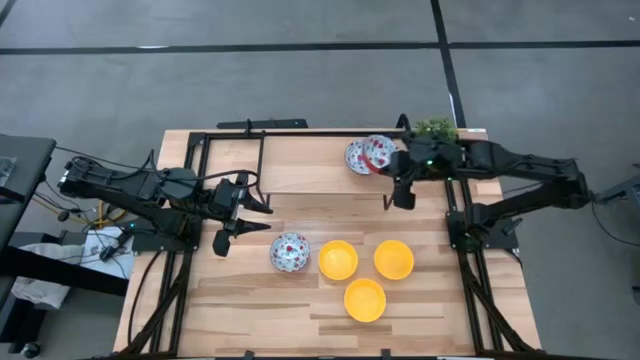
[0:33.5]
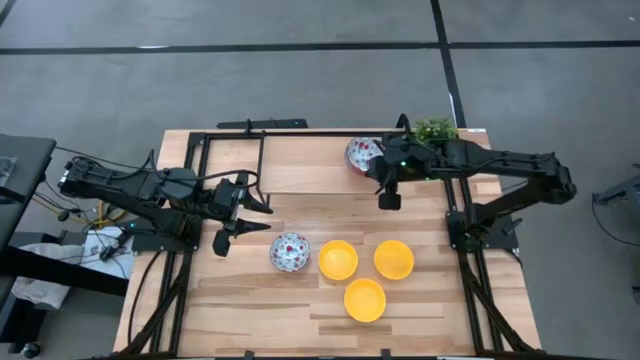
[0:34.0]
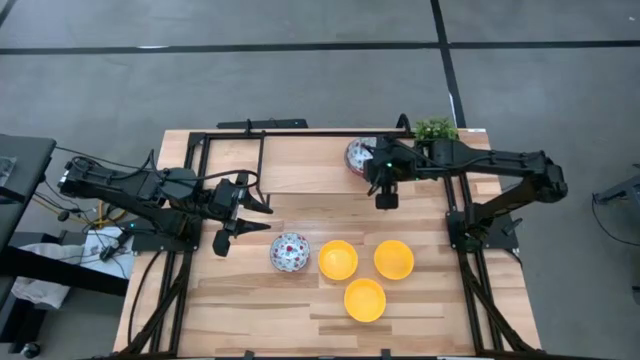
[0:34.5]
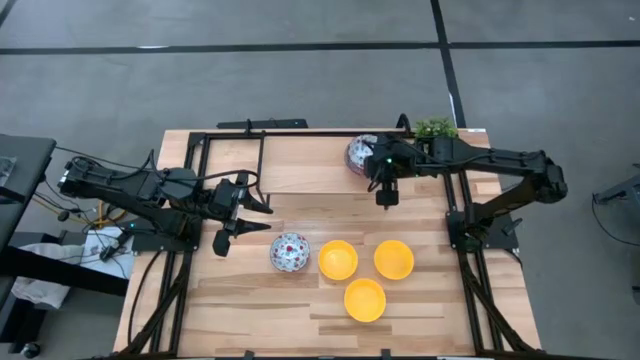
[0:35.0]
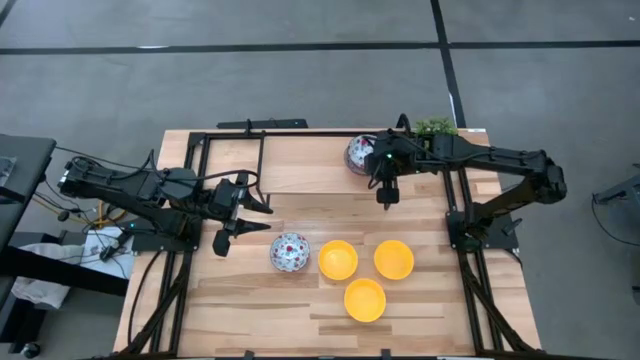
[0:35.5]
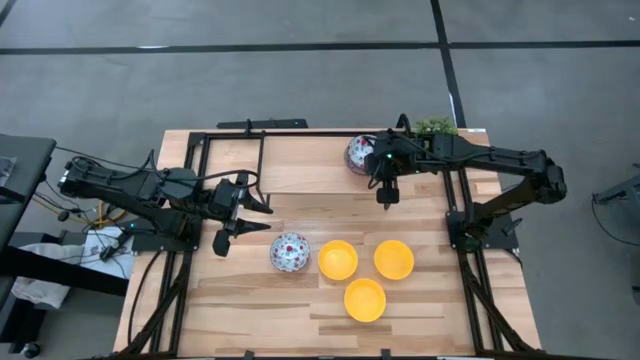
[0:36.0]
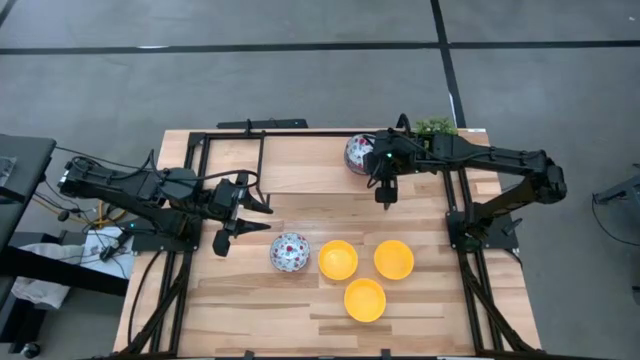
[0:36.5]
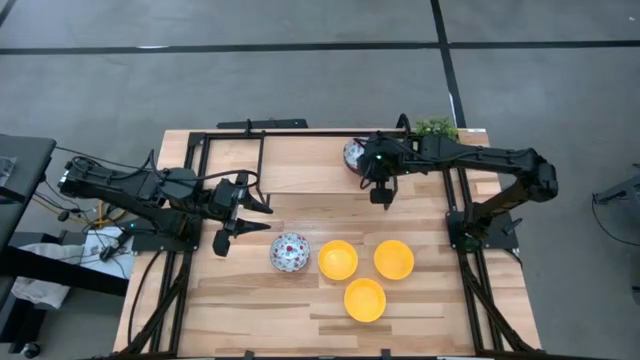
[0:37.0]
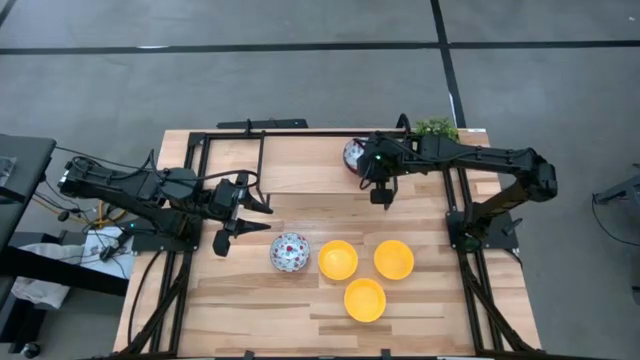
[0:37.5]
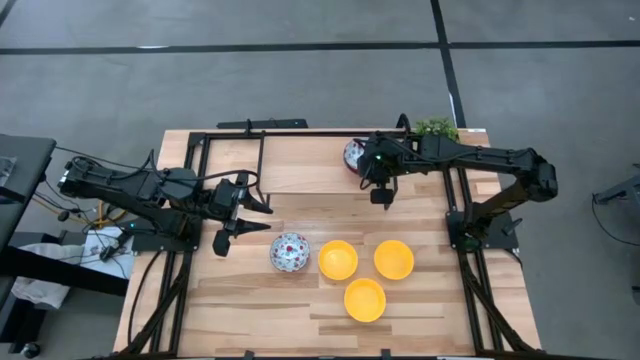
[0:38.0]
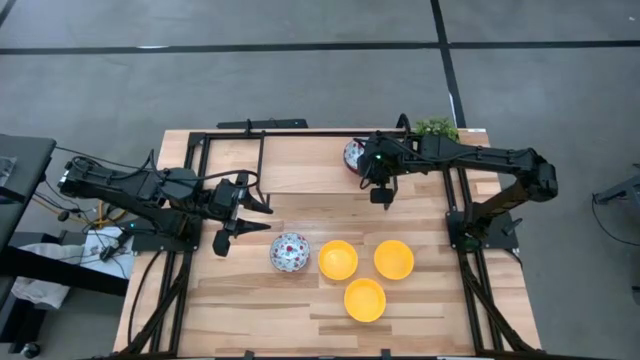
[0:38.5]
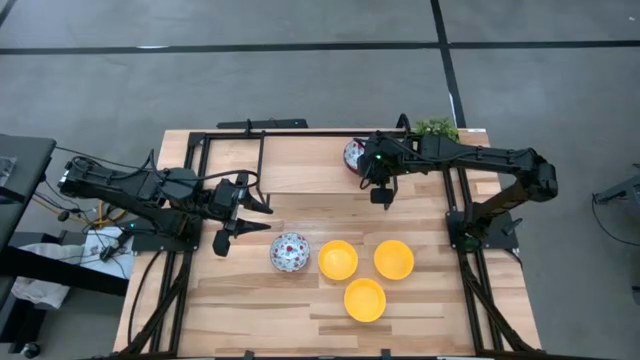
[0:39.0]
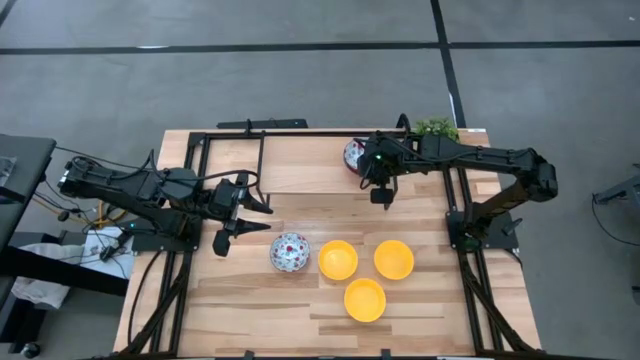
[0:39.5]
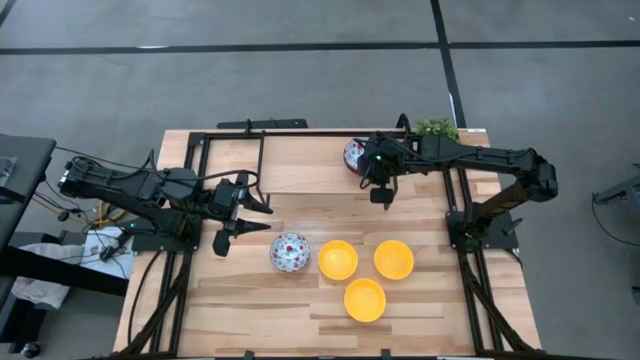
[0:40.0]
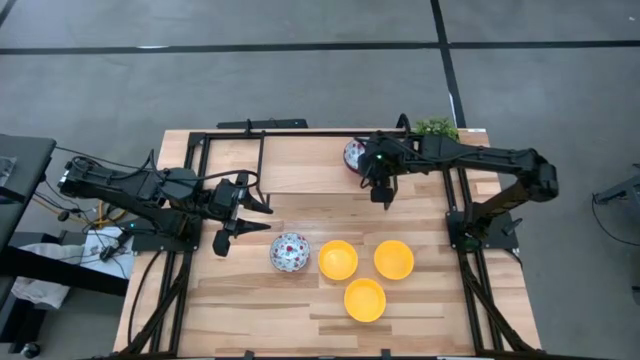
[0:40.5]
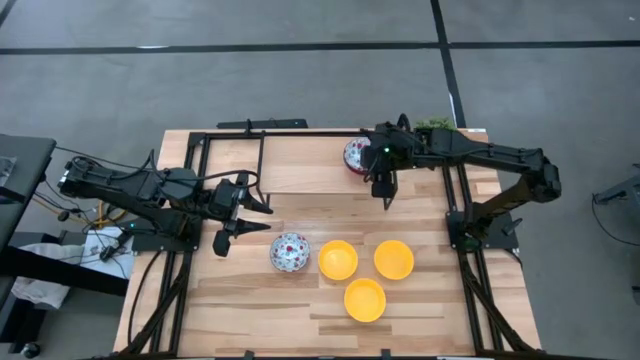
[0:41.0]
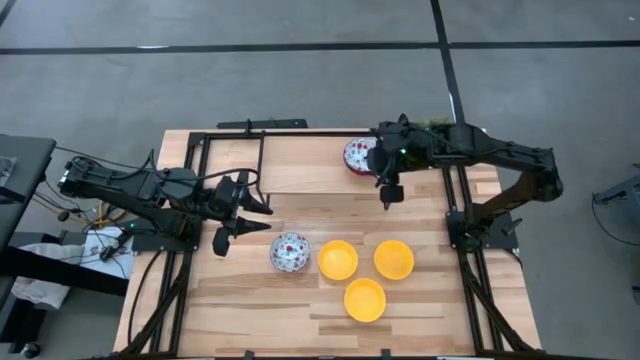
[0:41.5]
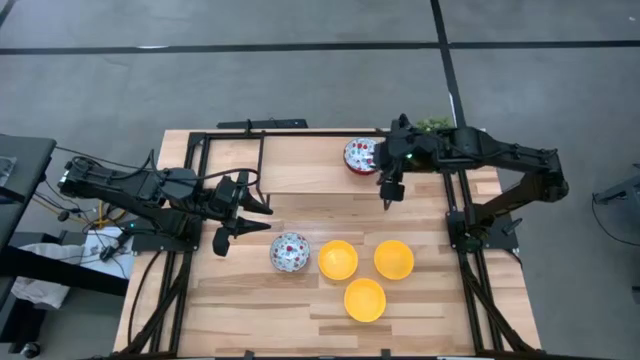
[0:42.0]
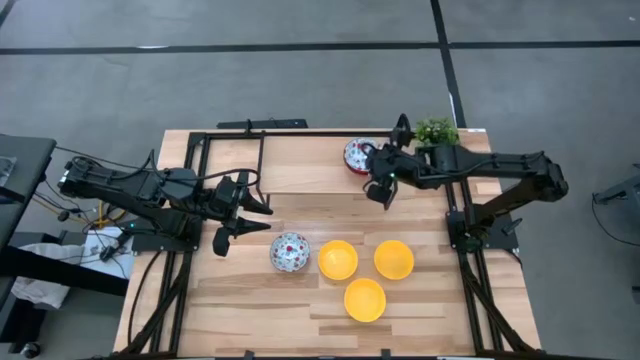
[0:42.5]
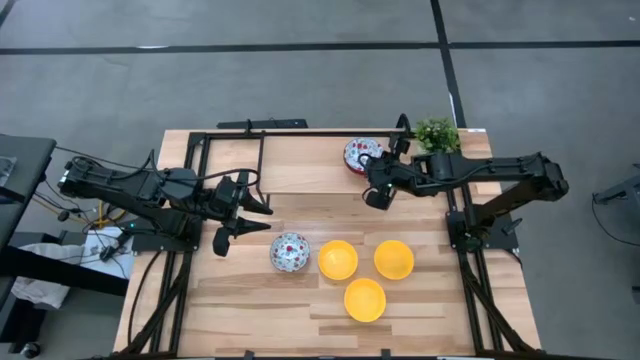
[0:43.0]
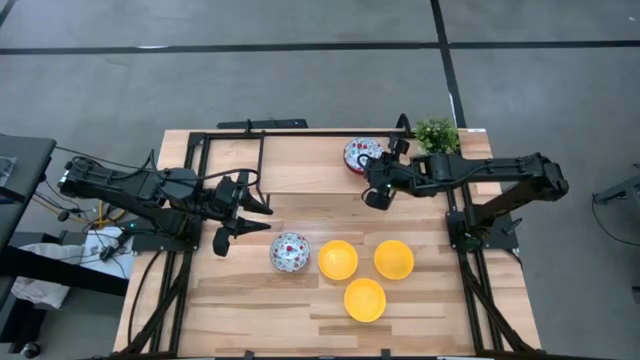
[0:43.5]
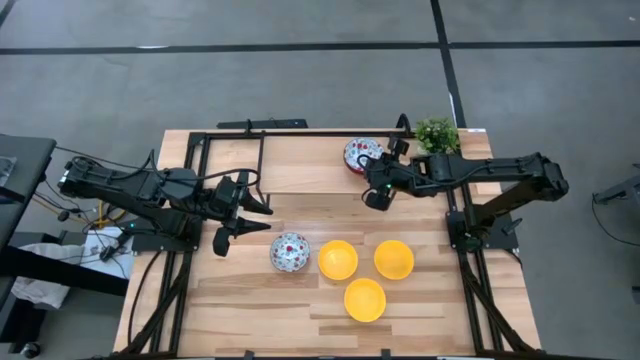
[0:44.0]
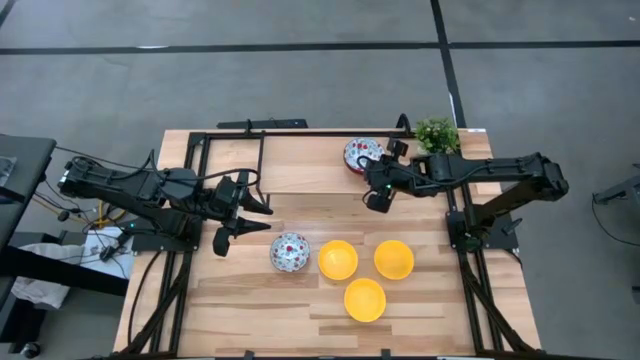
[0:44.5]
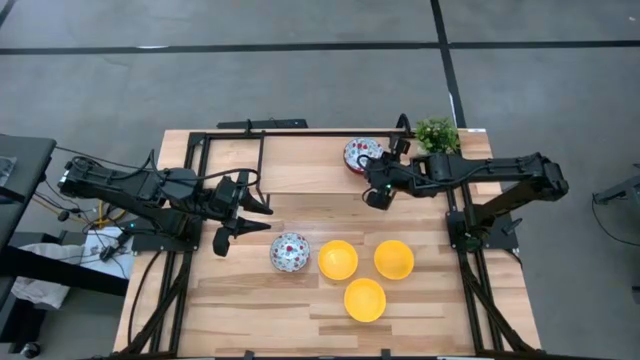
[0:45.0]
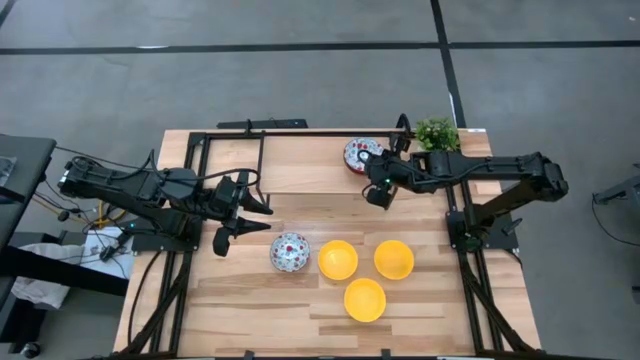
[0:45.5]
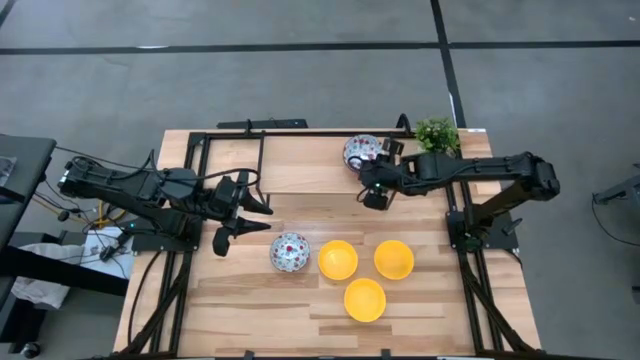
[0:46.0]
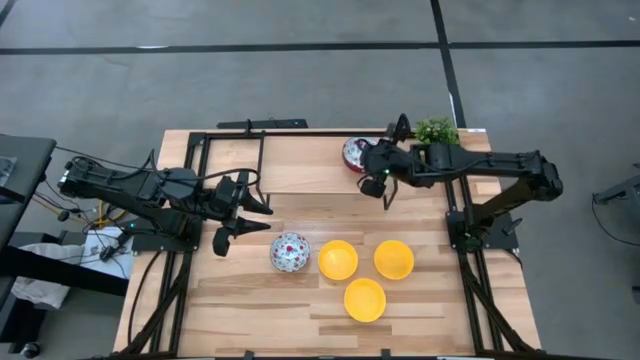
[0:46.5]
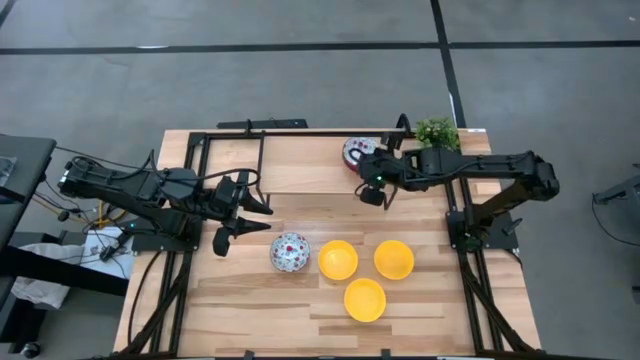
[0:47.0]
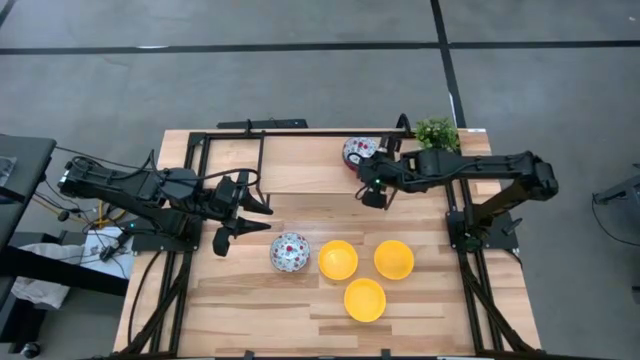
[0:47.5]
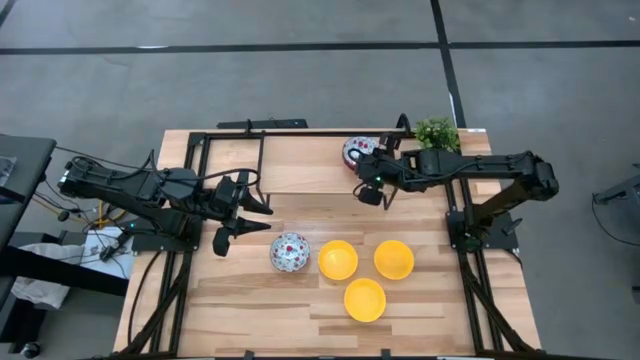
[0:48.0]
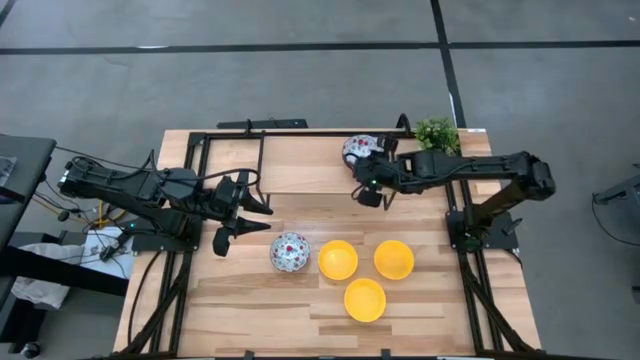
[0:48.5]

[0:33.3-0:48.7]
Task: Pick & Place Mini bowls
Stack the bottom red patterned bowl on top of the red patterned bowl on the shelf

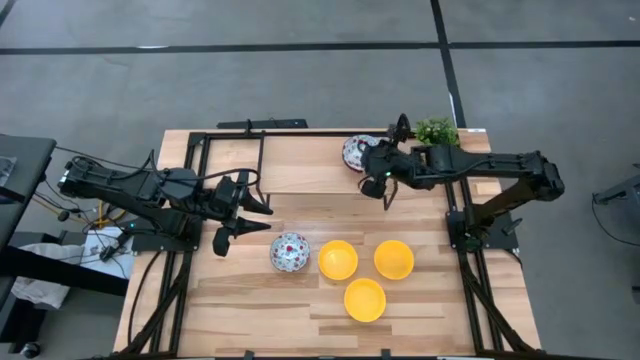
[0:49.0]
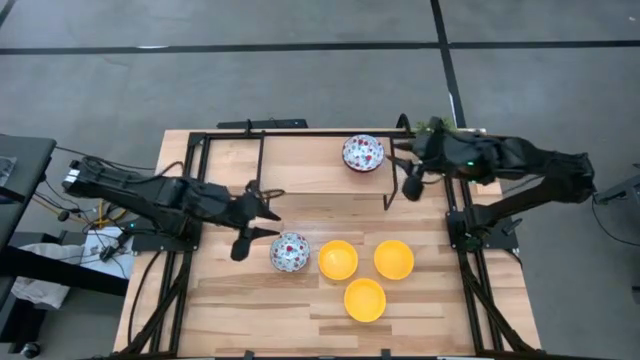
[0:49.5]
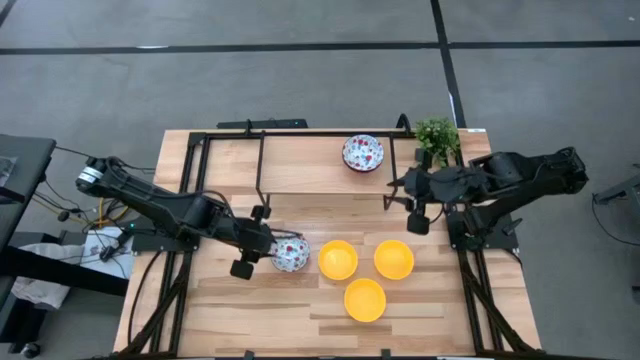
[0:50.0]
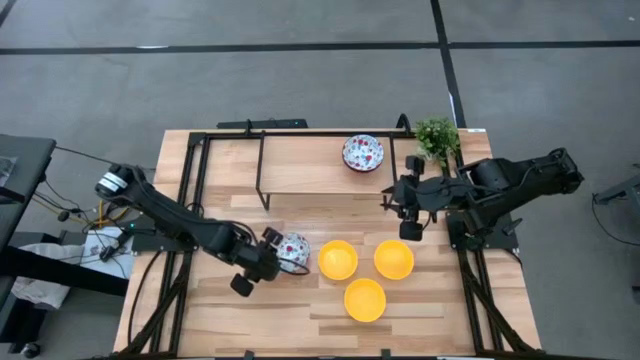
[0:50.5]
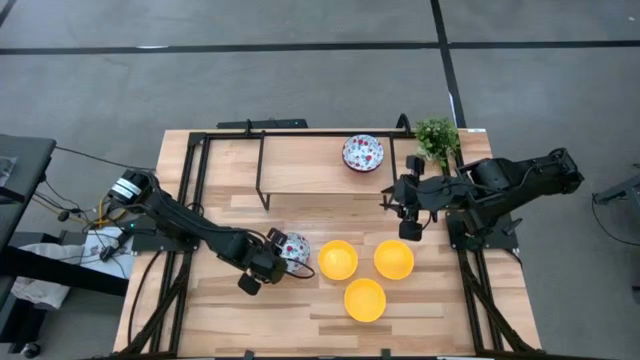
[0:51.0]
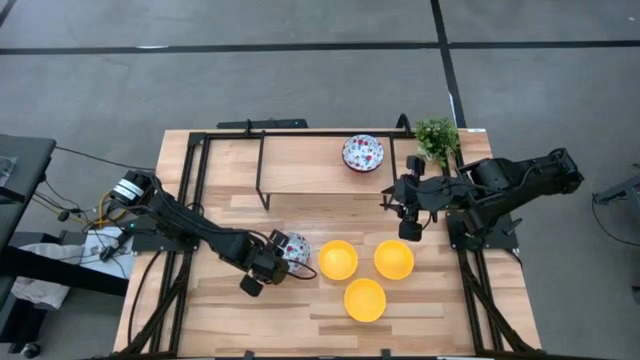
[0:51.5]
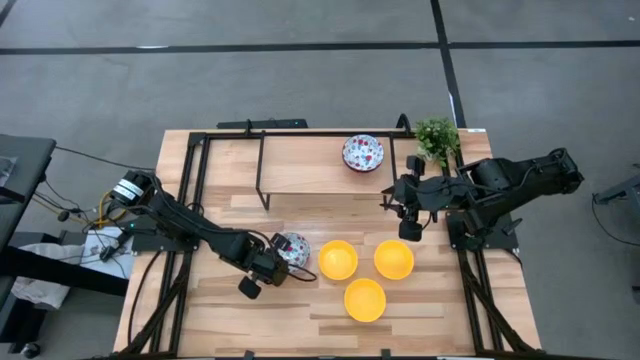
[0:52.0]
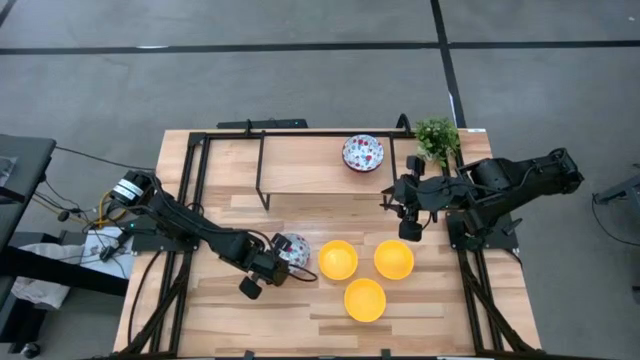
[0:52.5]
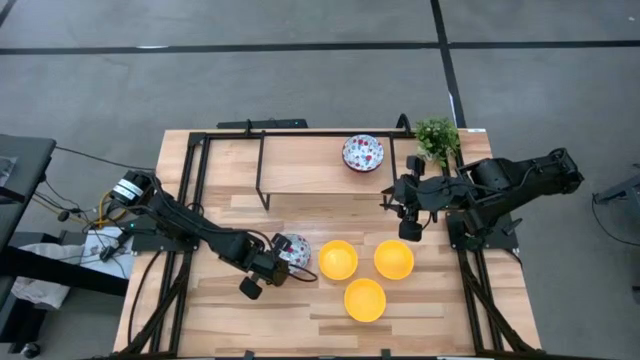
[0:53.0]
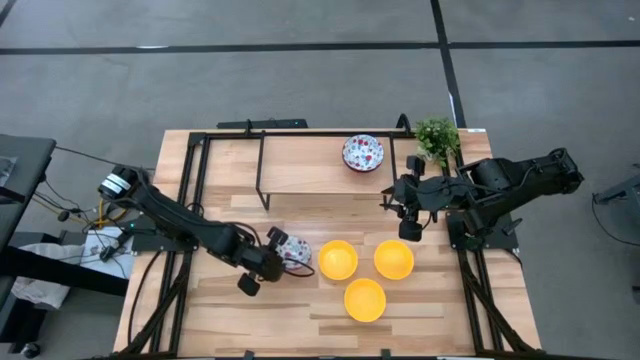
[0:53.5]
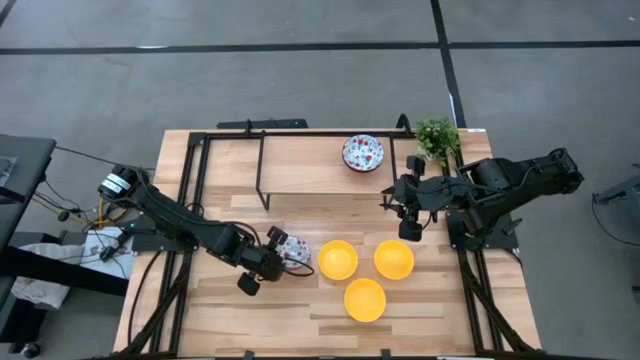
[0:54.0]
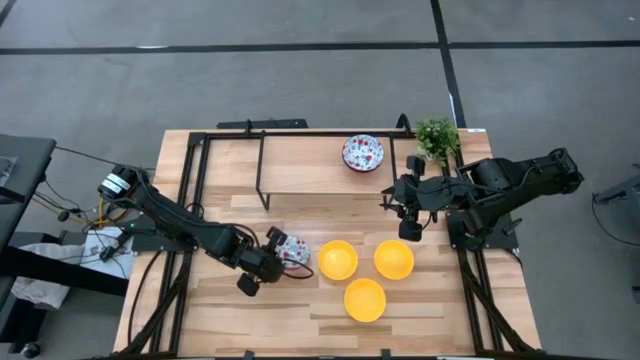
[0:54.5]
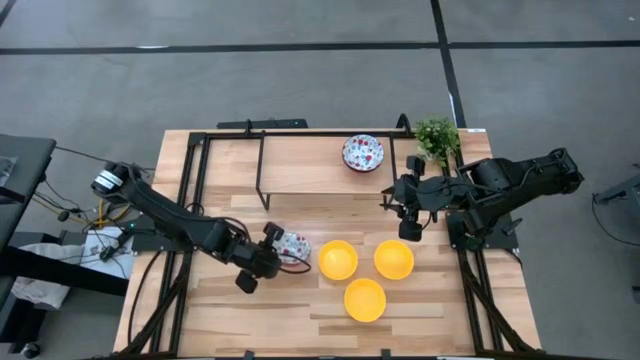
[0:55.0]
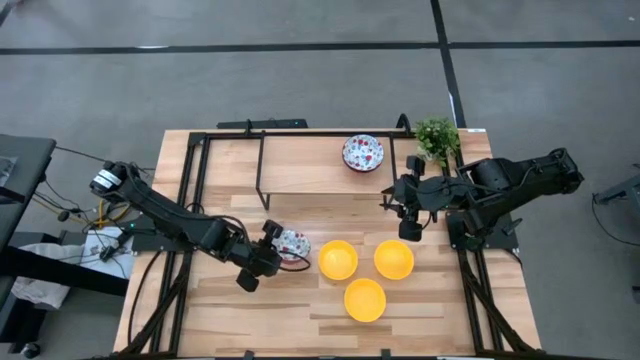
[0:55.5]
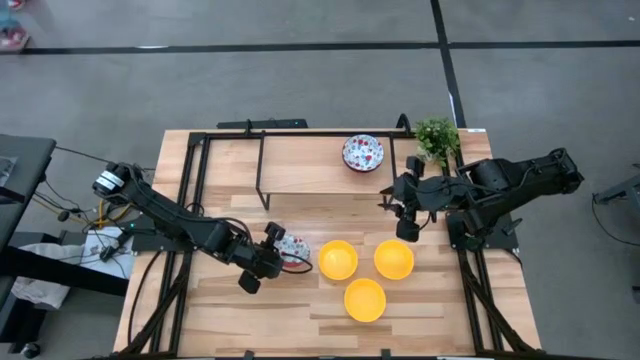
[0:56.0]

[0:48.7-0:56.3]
Stack the red patterned bowl on top of the red patterned bowl on the shelf
